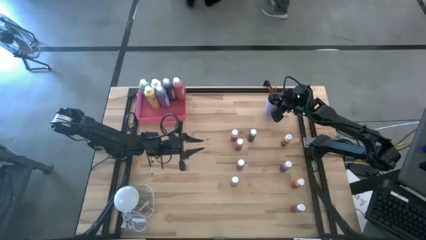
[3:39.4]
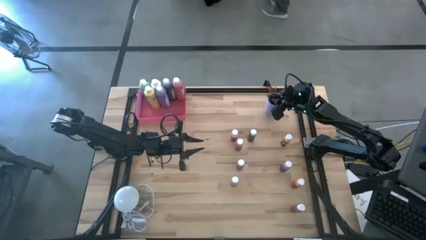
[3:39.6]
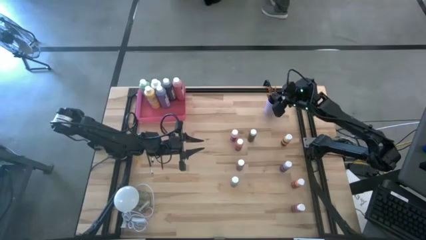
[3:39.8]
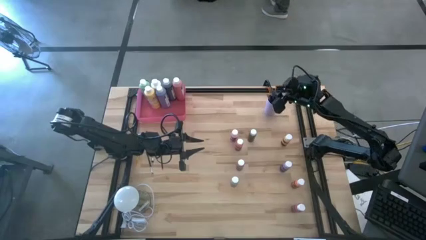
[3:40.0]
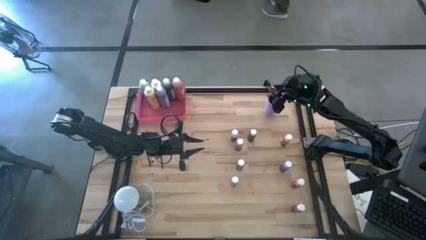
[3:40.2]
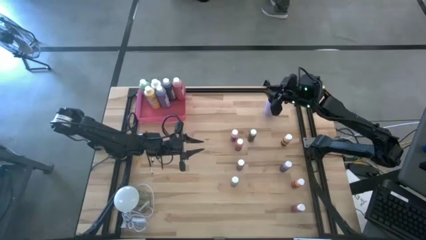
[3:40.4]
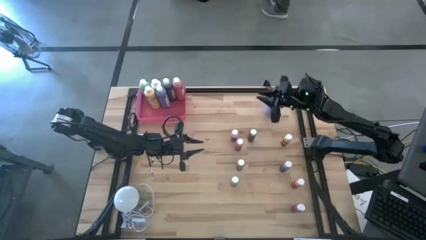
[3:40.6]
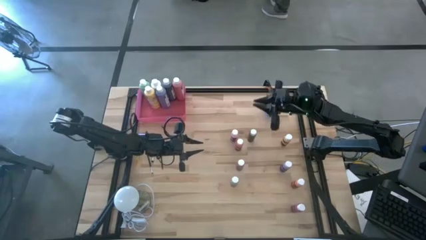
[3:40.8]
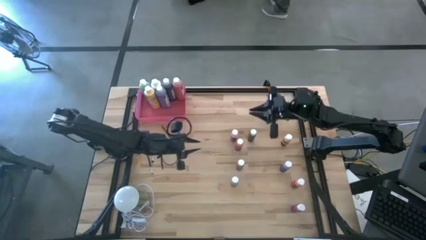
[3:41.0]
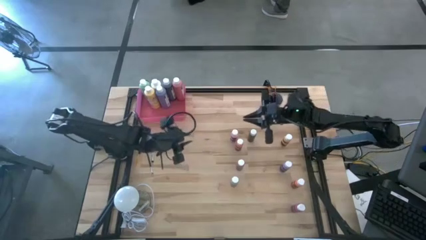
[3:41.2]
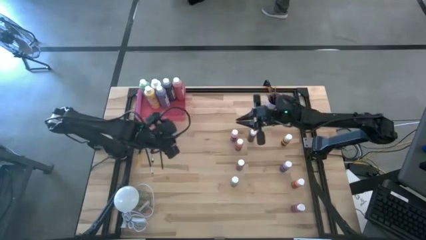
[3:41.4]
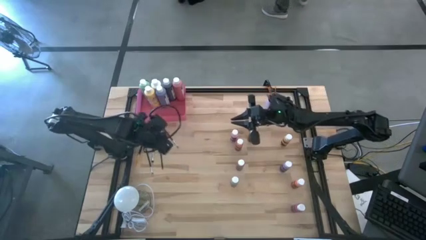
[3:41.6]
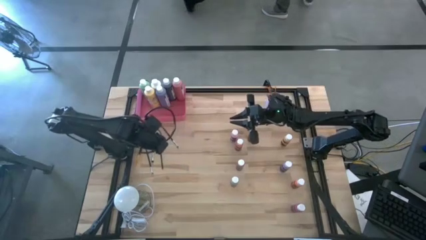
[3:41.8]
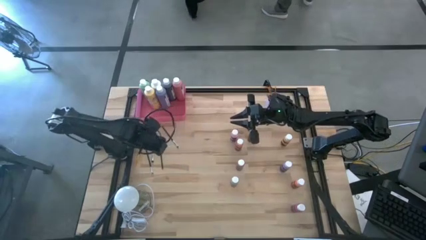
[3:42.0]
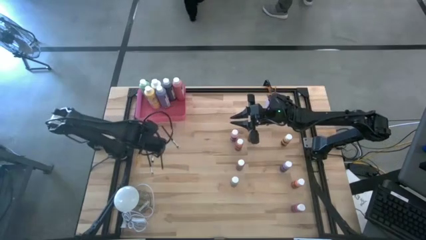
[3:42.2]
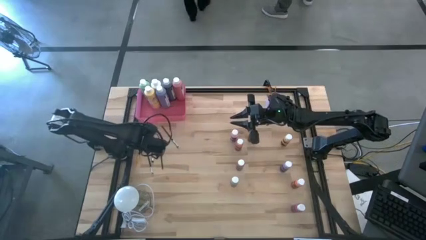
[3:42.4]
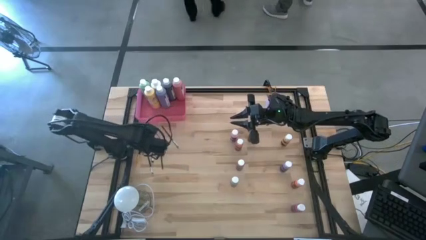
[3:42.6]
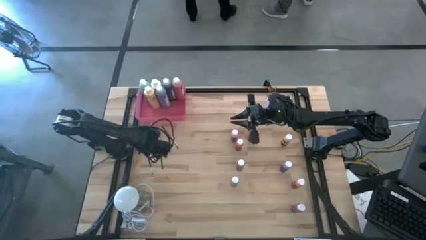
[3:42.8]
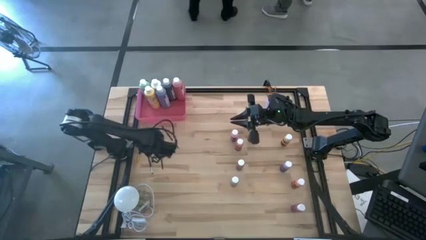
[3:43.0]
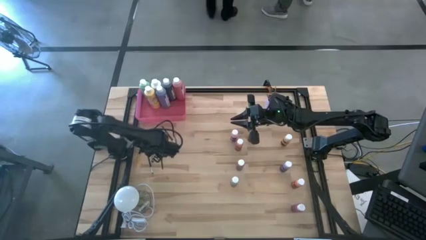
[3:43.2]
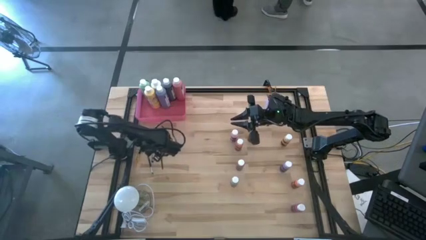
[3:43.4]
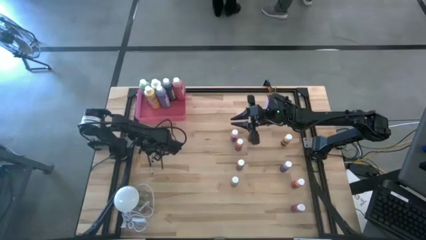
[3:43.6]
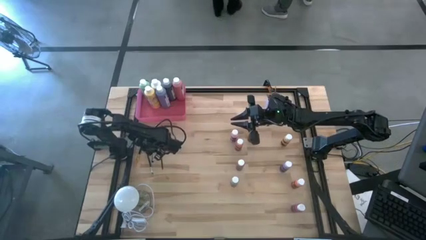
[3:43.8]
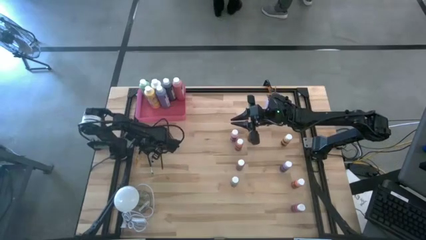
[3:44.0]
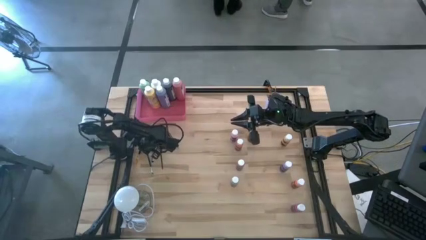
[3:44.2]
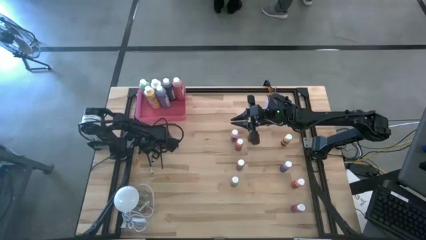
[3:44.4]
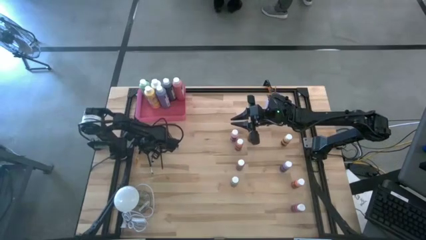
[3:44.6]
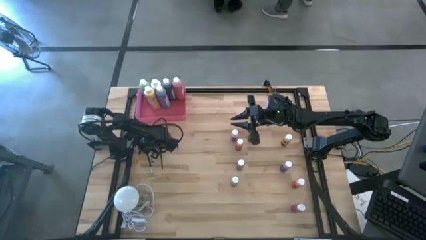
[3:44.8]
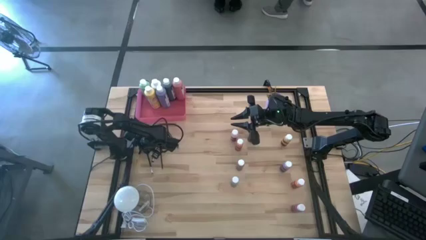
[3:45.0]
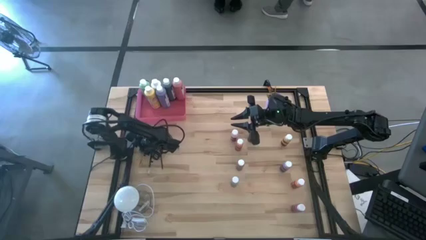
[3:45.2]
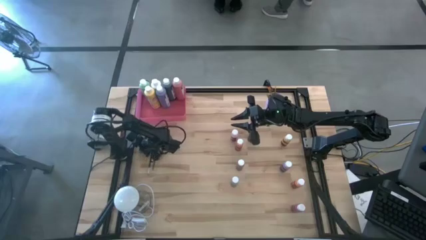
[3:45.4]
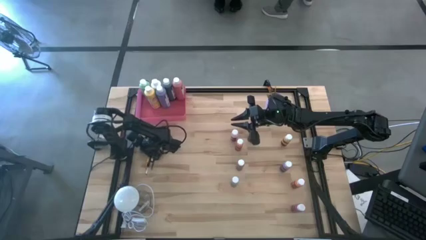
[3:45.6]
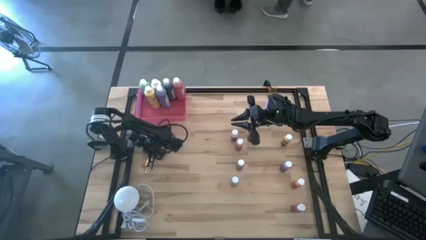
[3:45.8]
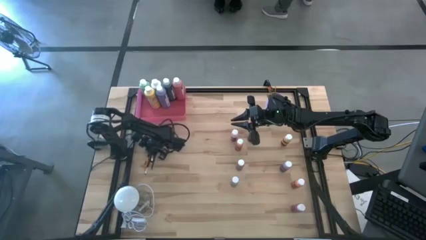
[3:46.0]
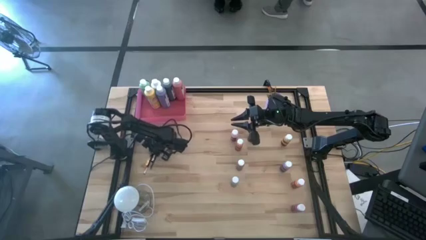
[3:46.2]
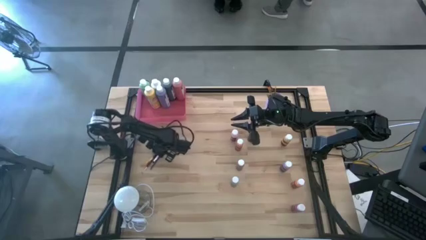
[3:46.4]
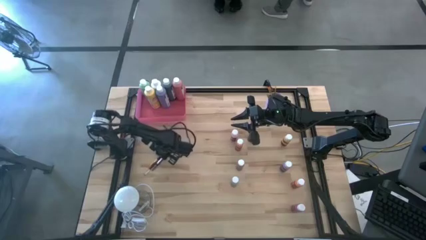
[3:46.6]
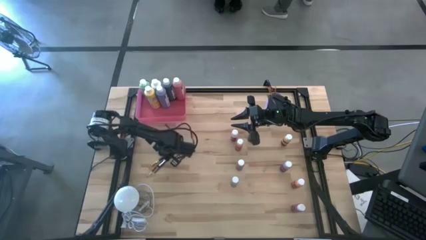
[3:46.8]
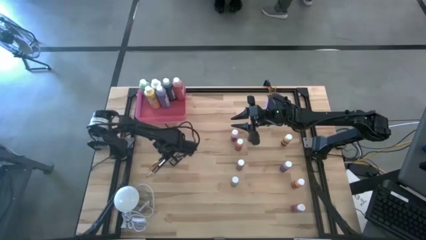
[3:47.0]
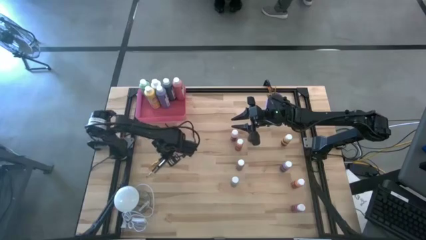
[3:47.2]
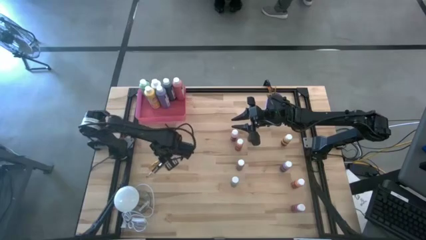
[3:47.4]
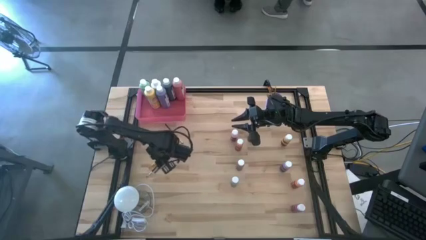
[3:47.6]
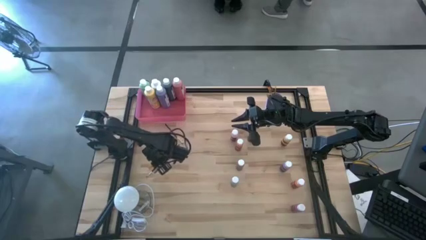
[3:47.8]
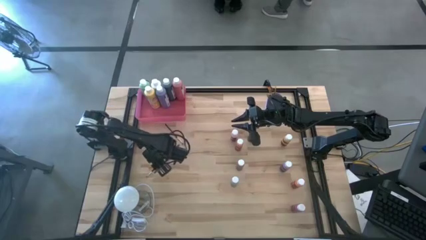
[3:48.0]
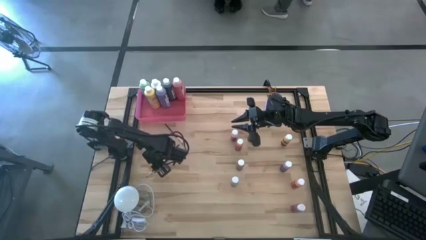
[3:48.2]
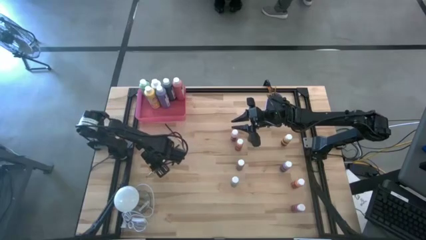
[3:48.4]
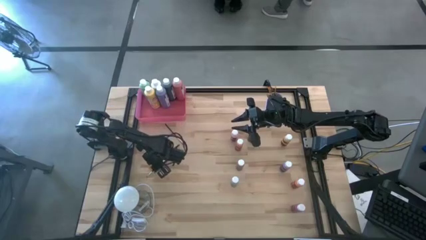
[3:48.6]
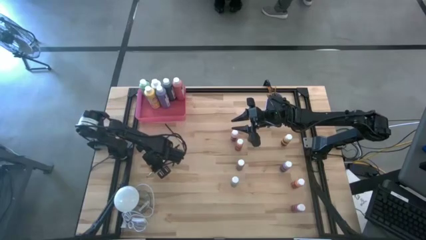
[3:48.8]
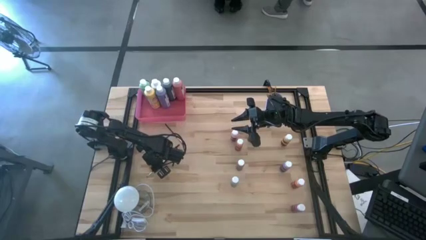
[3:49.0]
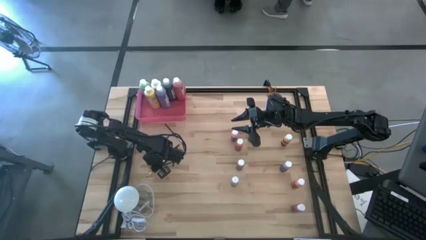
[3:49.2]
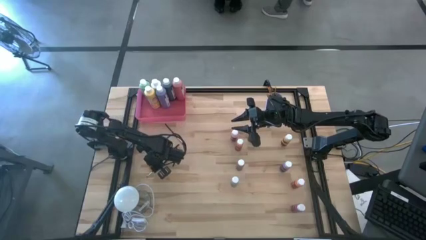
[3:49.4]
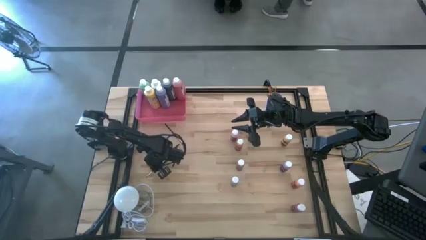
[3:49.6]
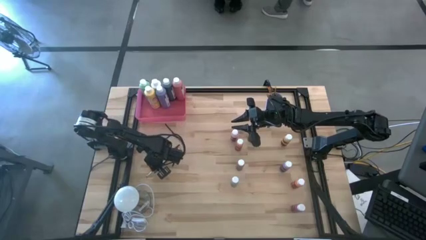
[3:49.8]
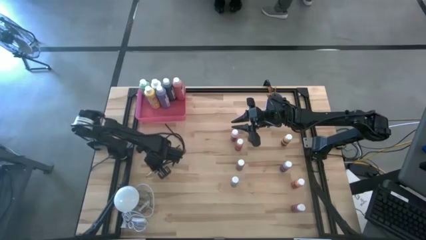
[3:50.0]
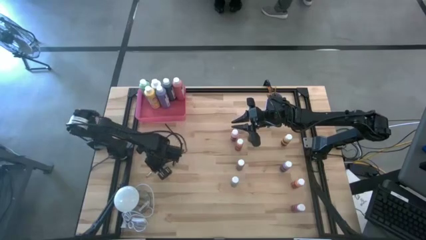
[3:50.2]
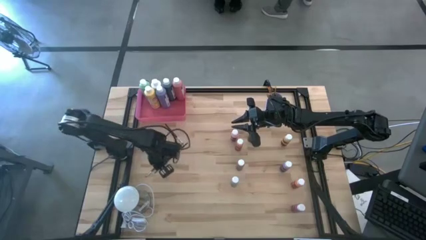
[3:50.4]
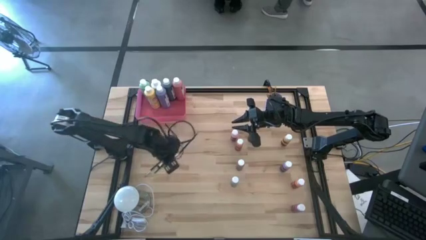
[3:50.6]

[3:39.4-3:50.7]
Task: Pick & Place Paint Supplies
Put the gold paint brush into the purple cup

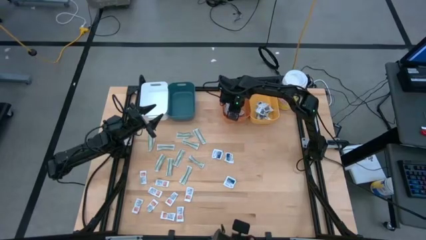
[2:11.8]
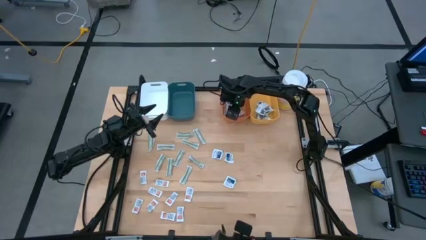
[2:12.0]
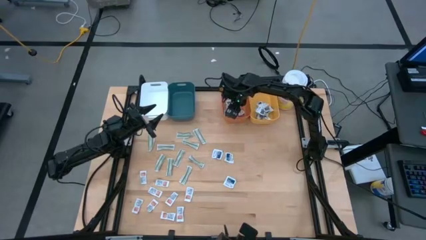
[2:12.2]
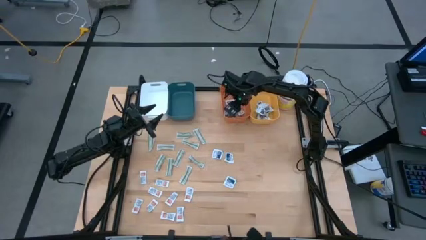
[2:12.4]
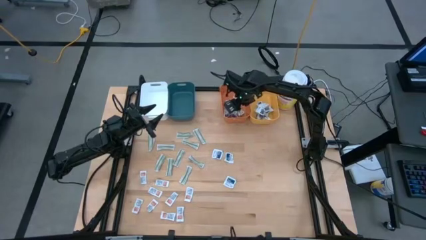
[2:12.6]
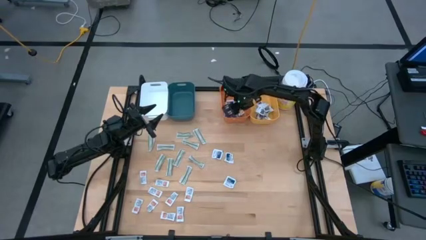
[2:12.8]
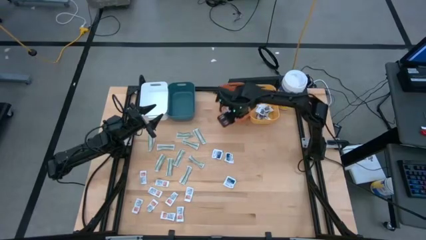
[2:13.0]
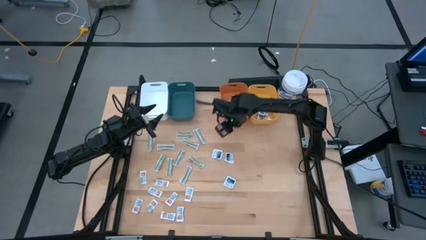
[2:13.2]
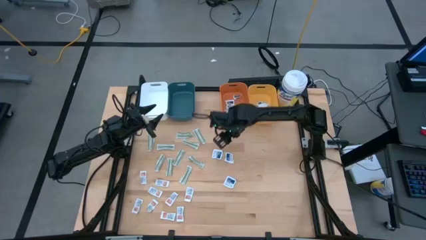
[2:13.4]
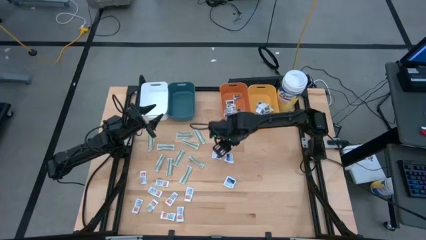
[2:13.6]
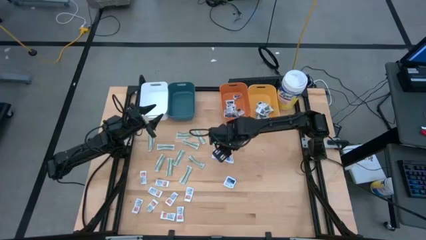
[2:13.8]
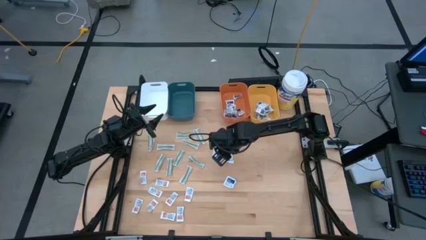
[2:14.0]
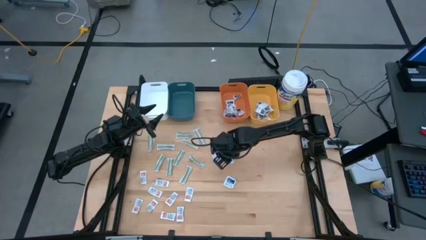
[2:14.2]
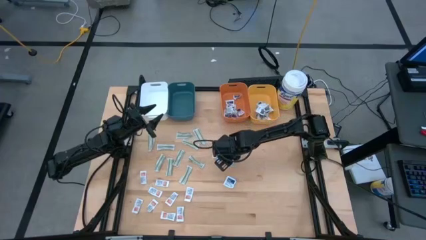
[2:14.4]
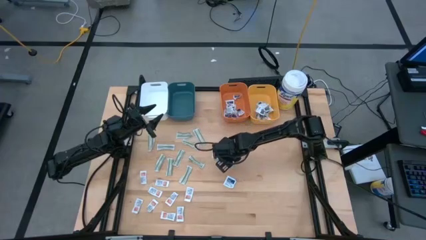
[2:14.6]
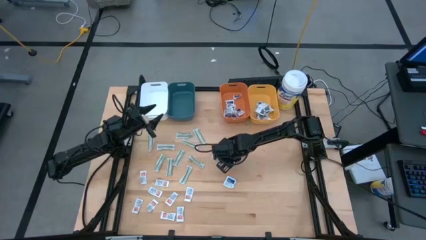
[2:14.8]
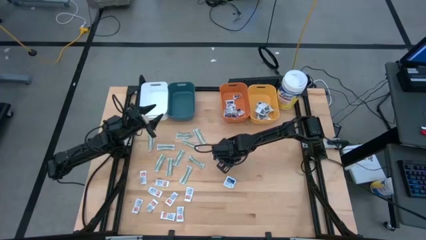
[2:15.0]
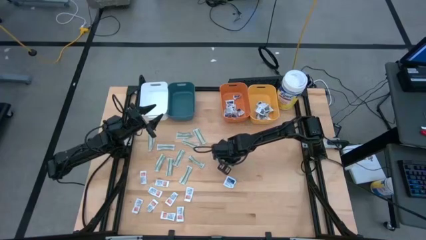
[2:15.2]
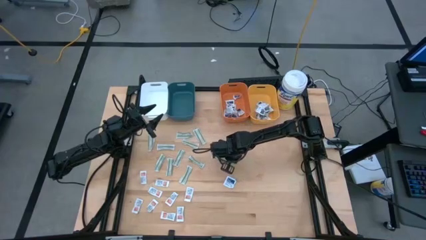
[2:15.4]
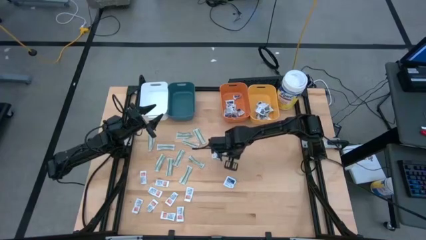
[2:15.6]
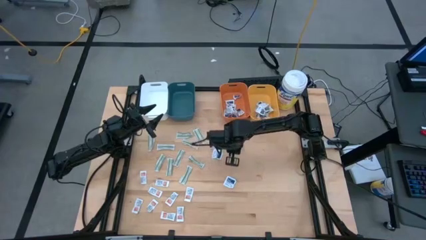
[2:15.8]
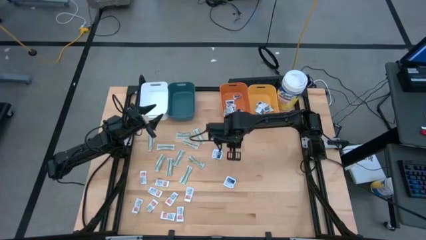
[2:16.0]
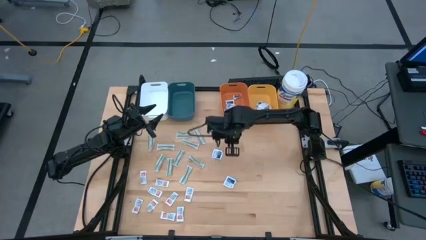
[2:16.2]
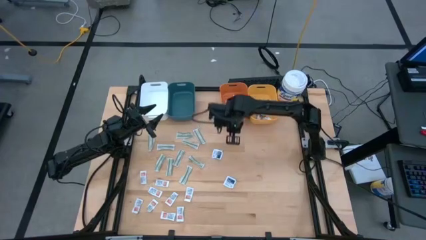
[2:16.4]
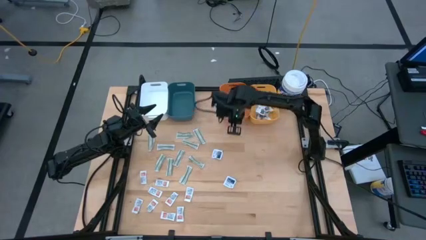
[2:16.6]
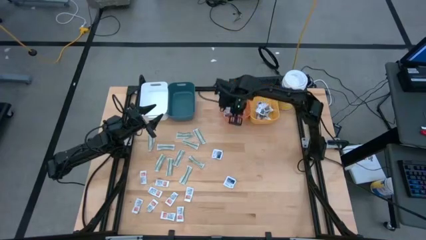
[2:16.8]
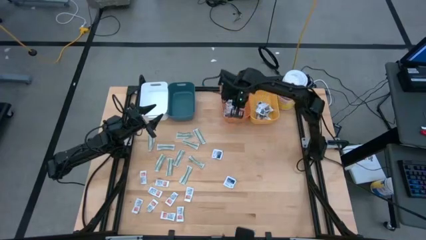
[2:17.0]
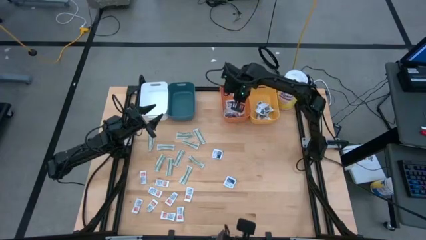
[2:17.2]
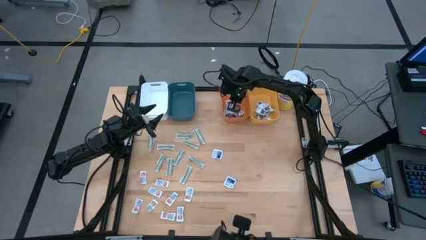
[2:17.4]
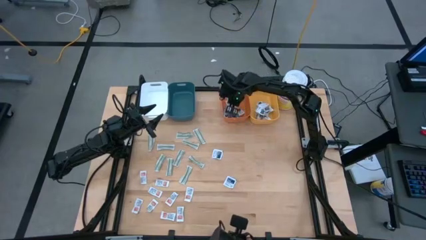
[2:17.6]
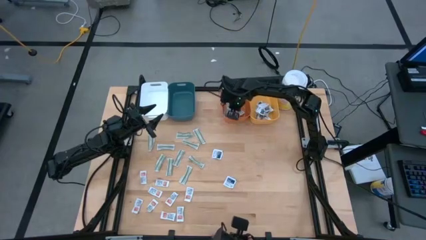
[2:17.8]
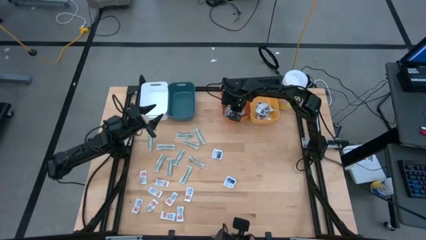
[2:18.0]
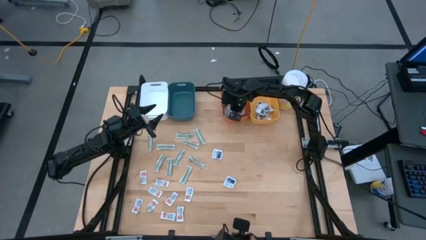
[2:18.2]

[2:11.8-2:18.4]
Task: Pick & Place First Aid Supplies
Put the alcohol pad into the orange bin
